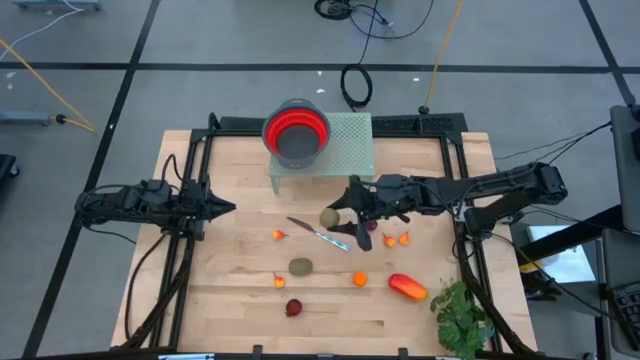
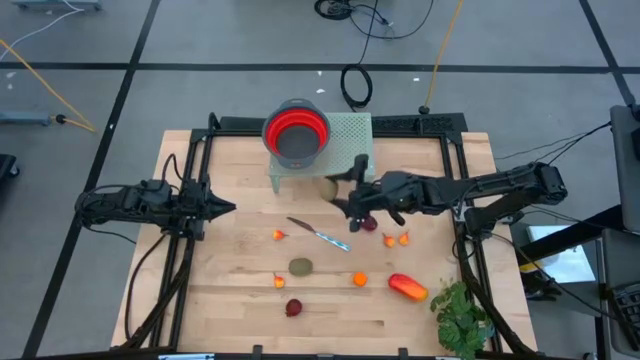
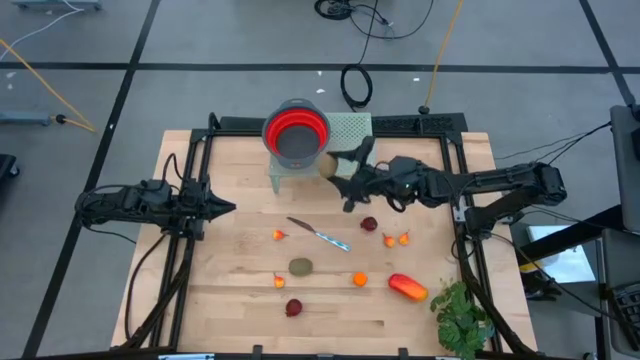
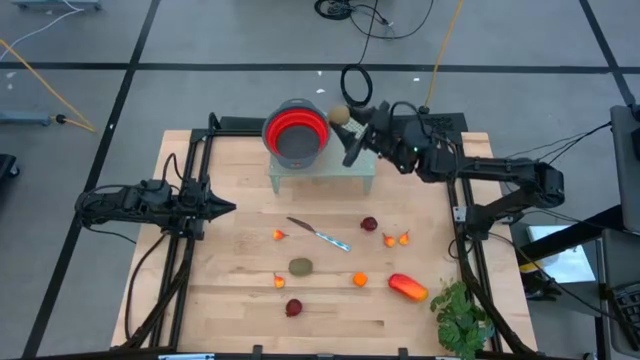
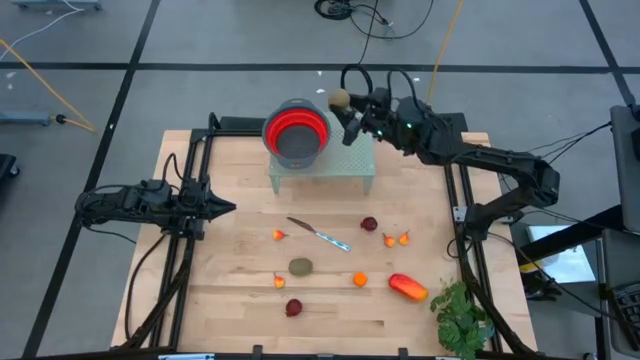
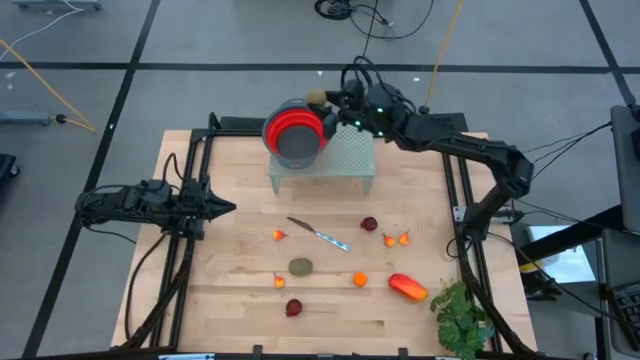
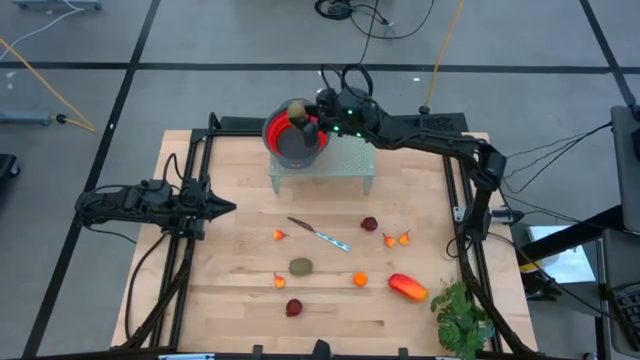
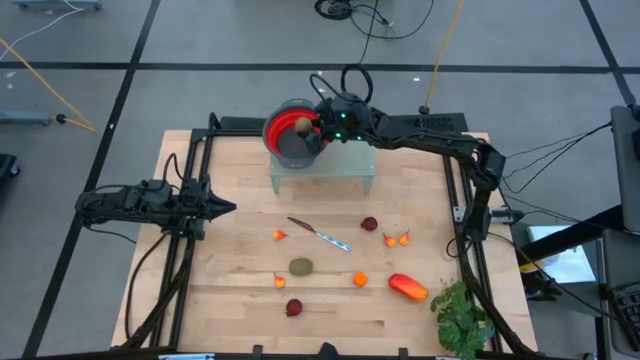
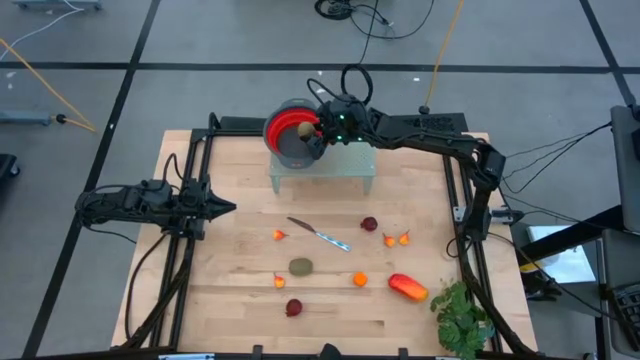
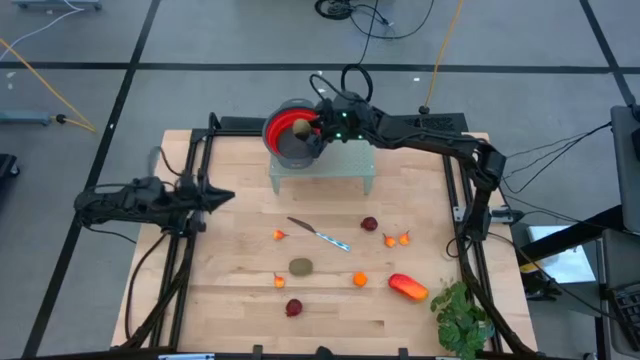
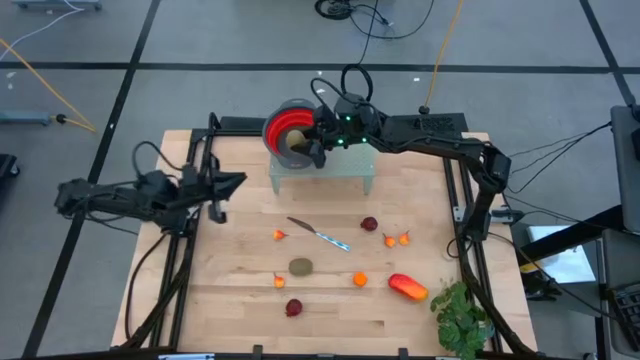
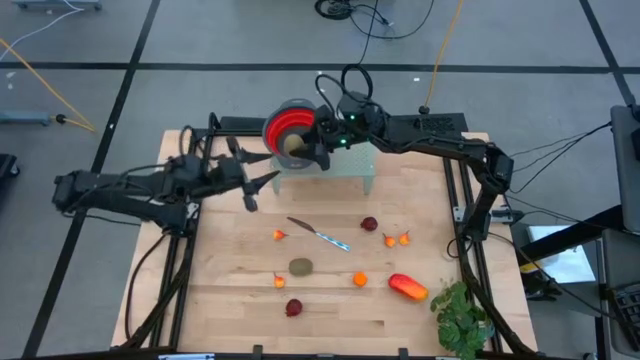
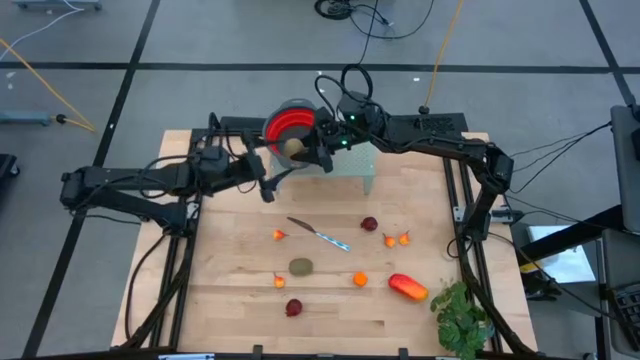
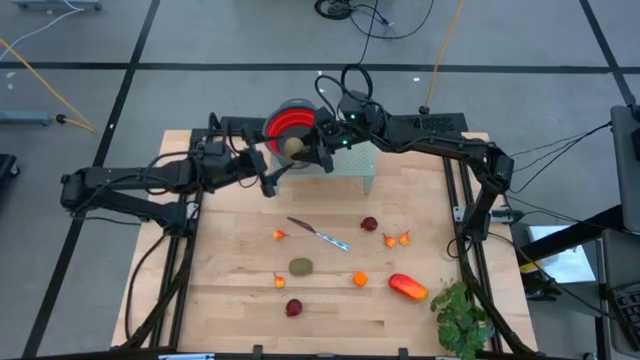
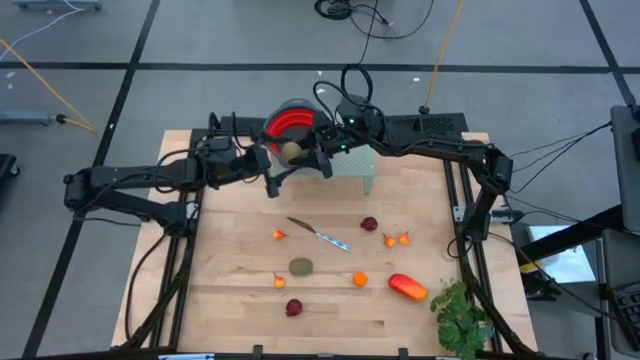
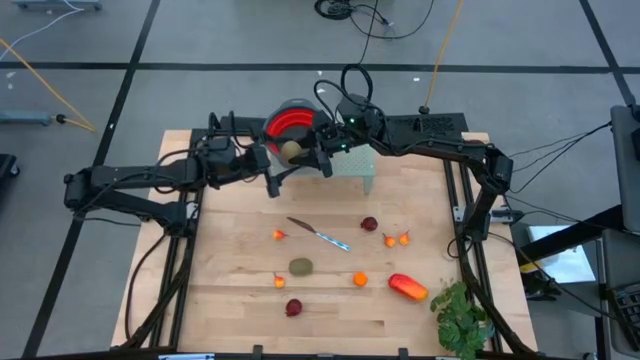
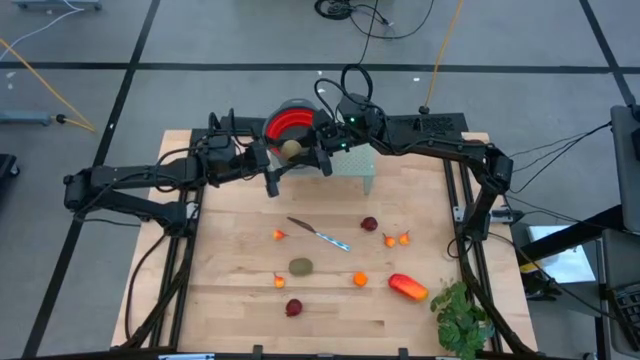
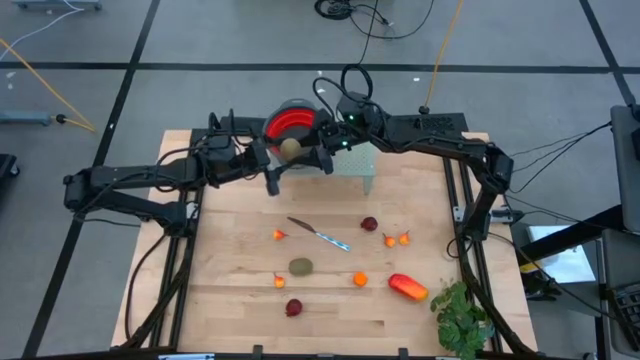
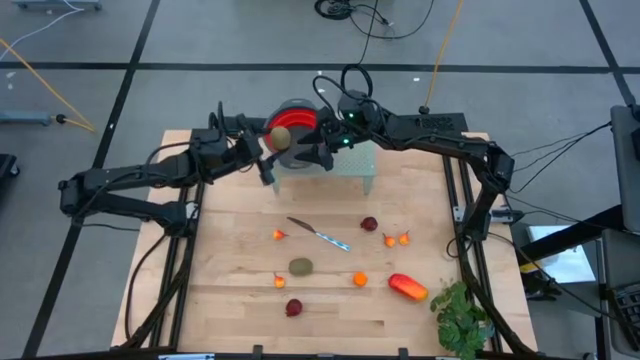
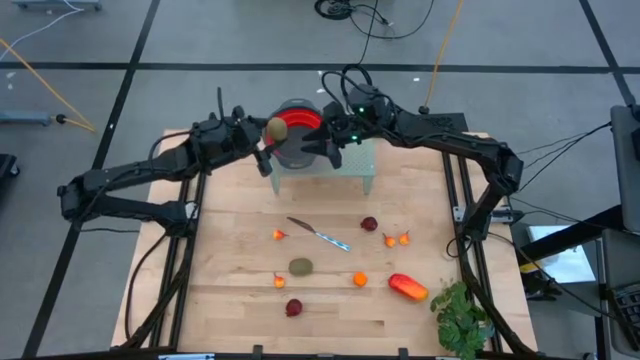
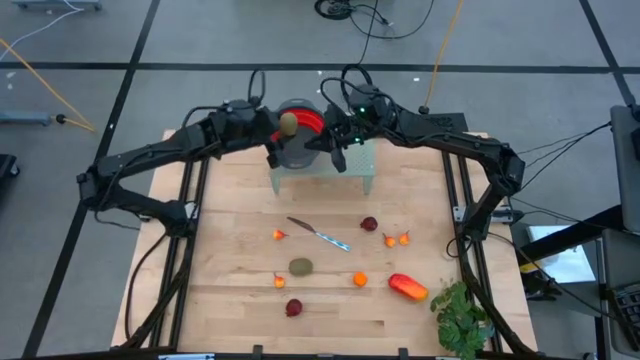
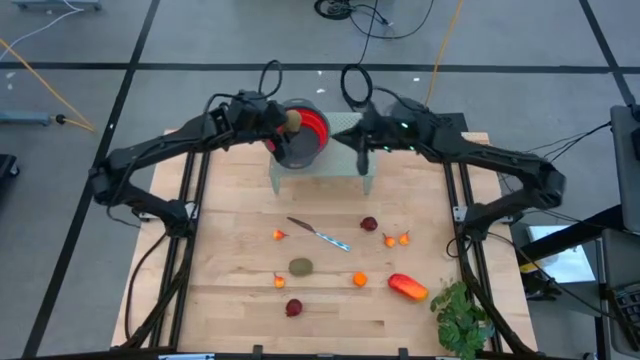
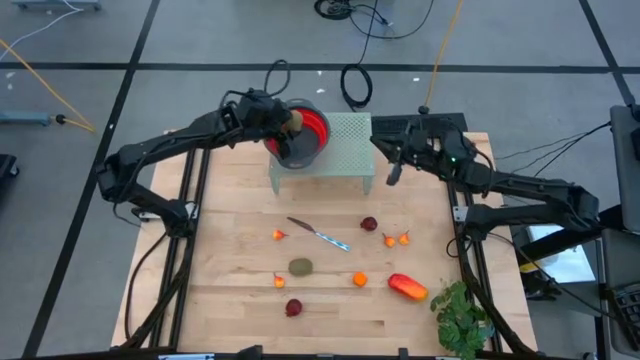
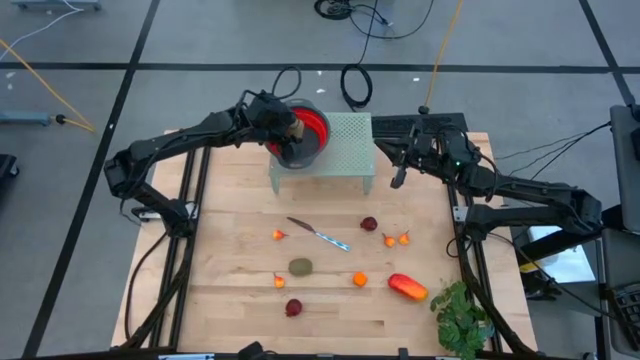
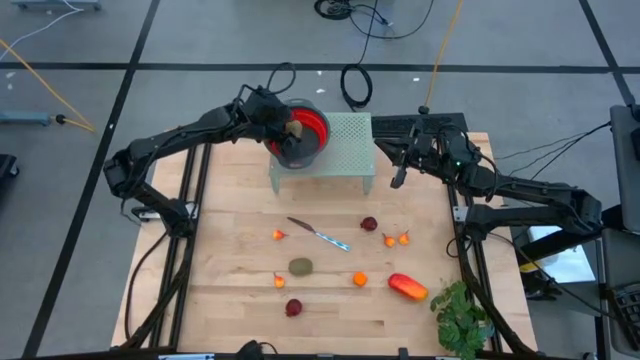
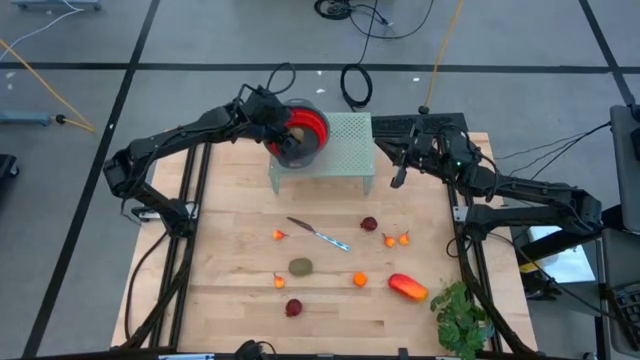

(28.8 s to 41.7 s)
Task: Pick & Place Fruit
Put the kiwi into the red strainer bowl

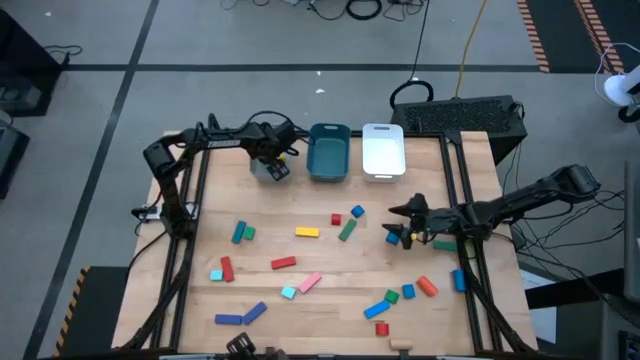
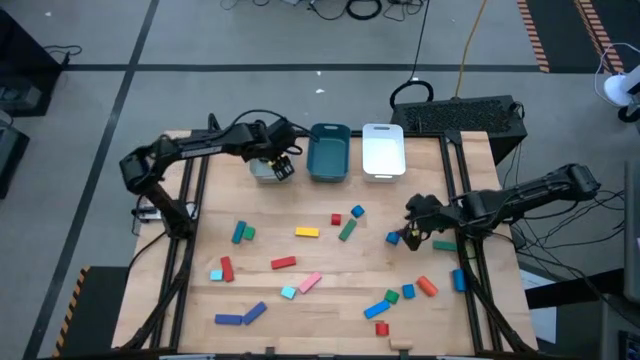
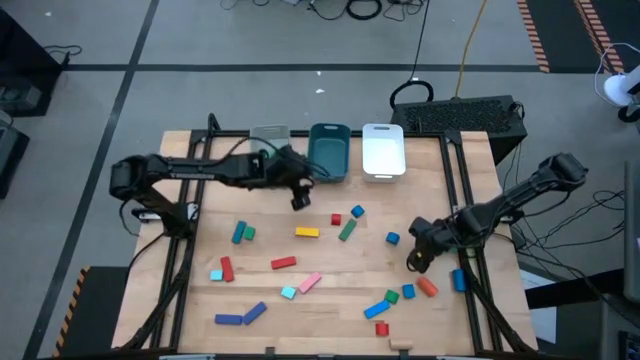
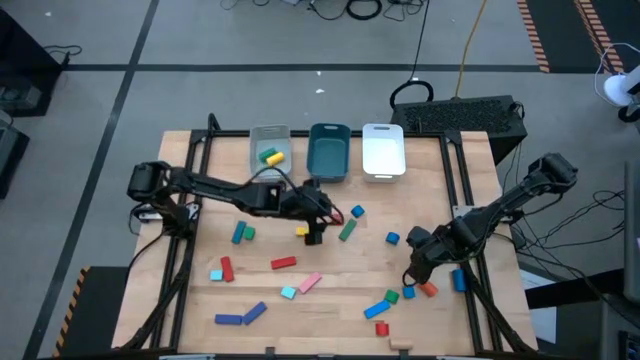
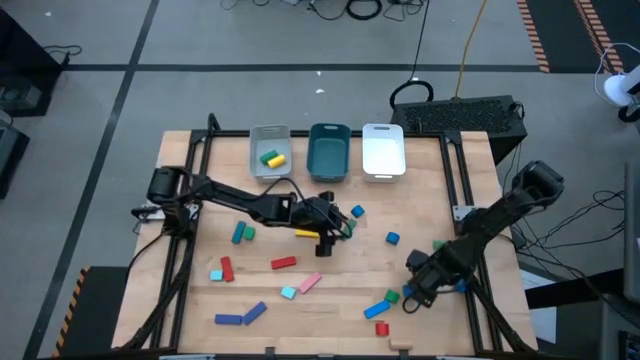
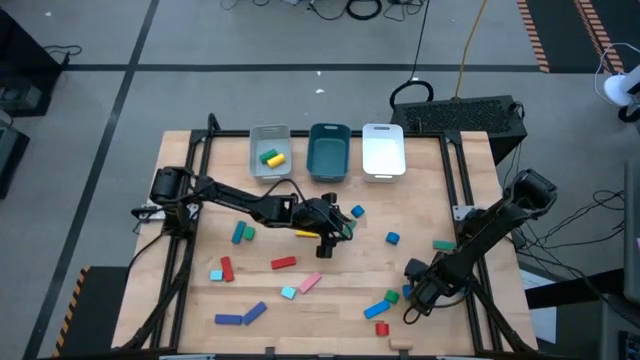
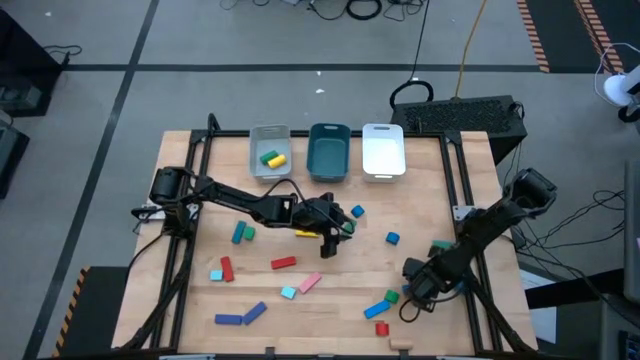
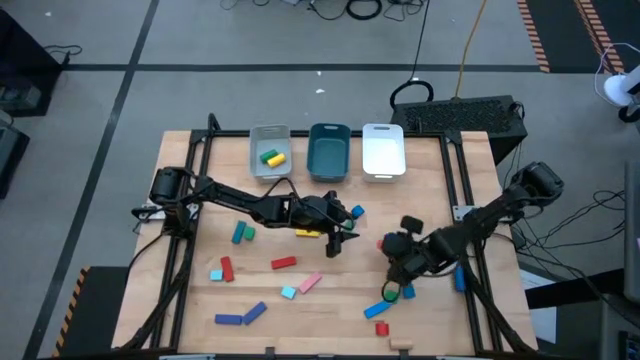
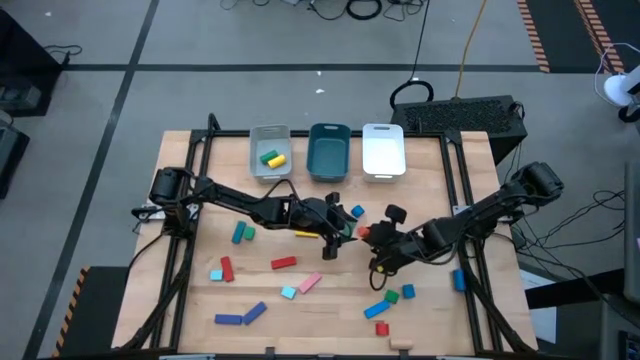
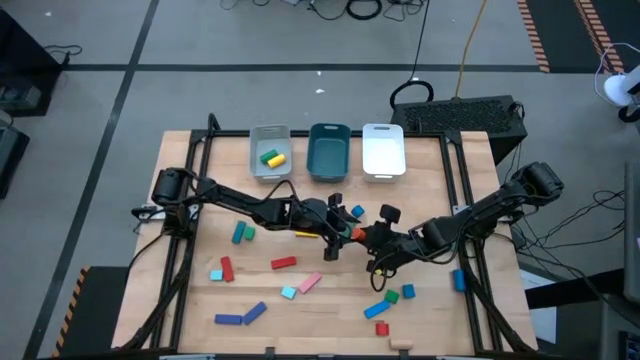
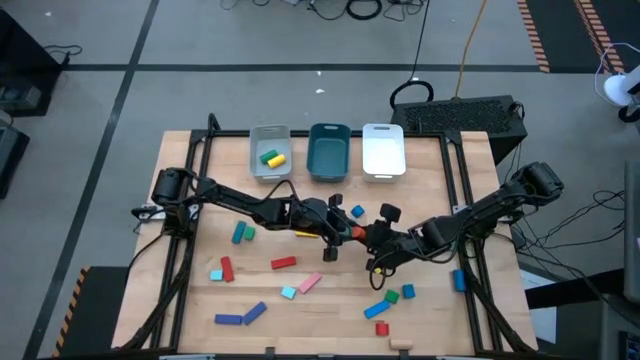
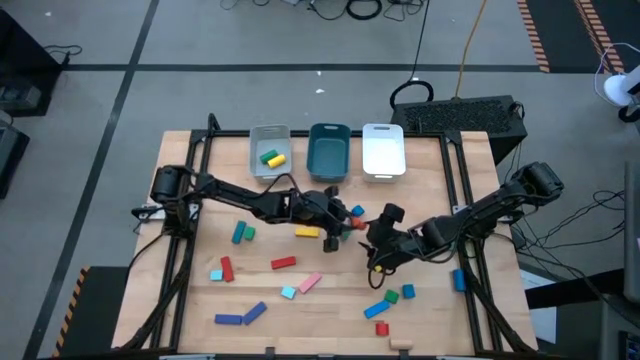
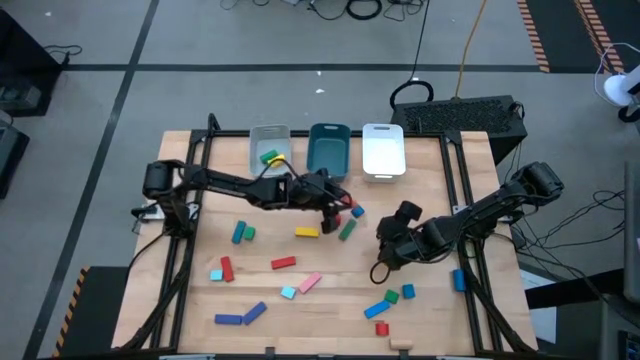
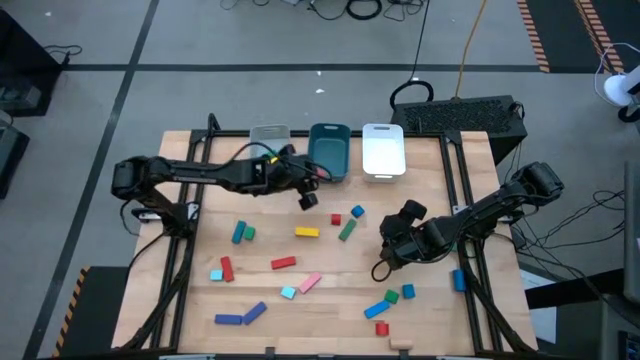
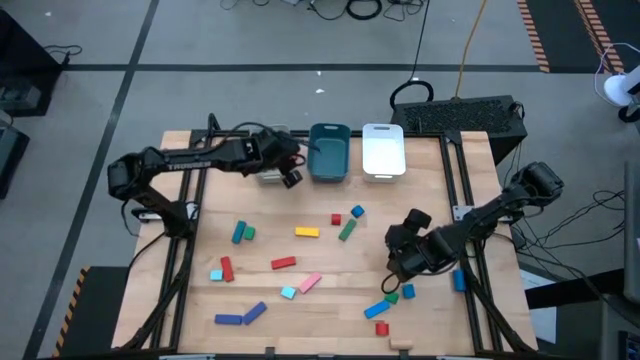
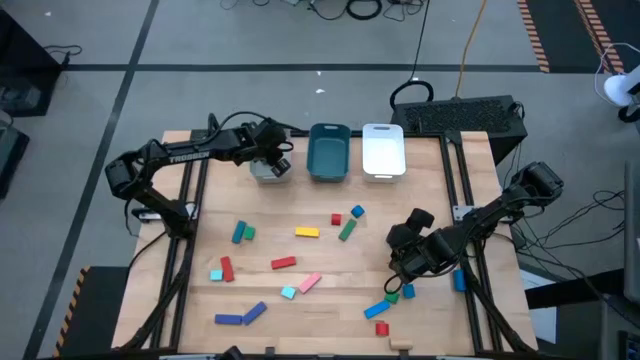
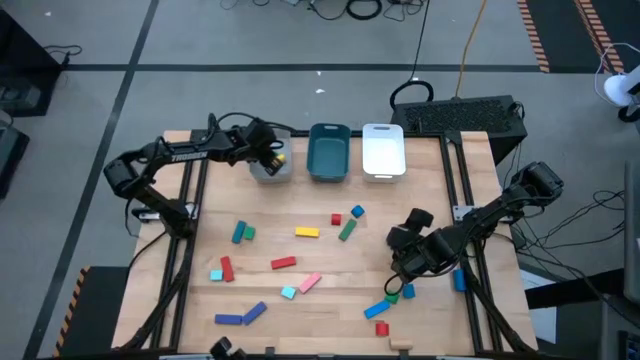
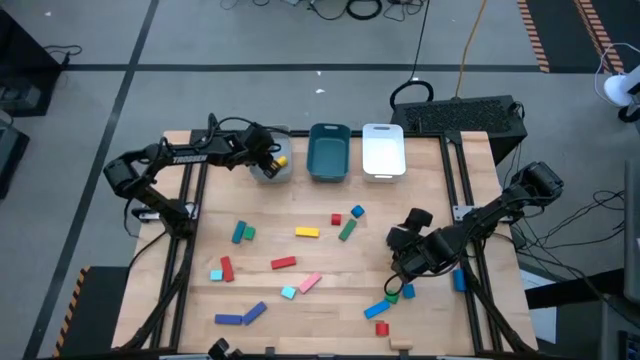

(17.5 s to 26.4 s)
Task: Sort blocks by size
Put the orange cylinder block into the gray bin
